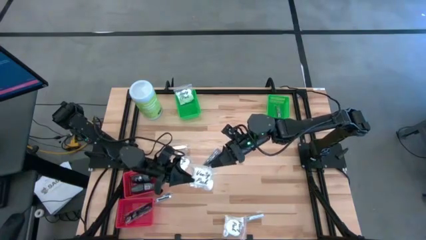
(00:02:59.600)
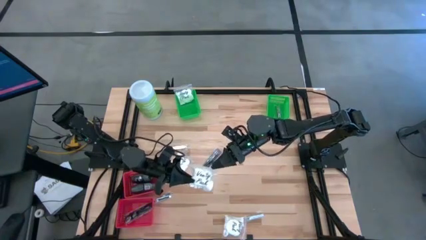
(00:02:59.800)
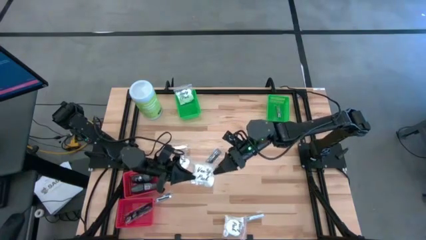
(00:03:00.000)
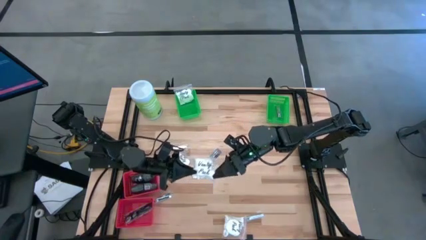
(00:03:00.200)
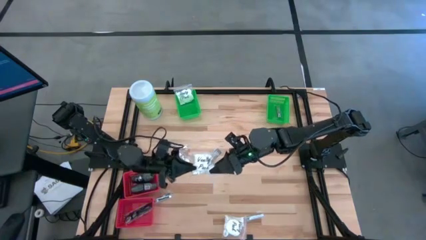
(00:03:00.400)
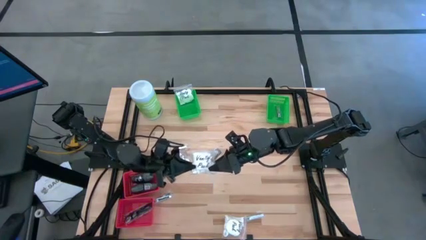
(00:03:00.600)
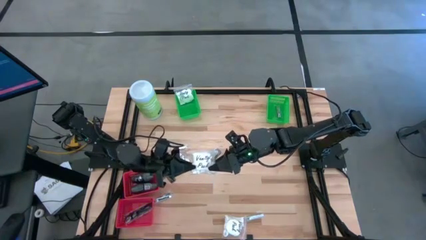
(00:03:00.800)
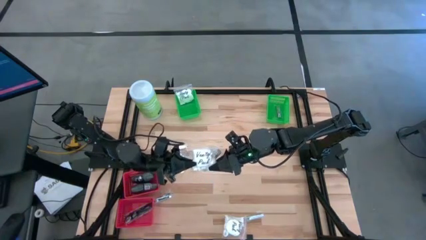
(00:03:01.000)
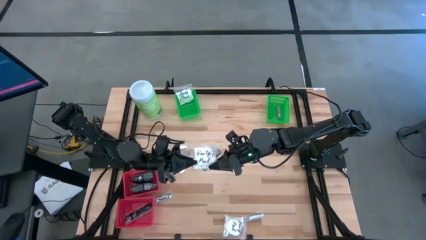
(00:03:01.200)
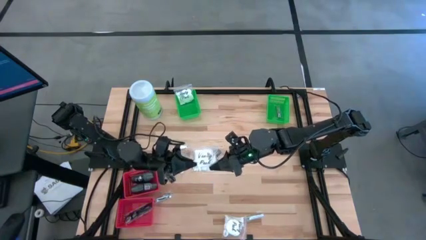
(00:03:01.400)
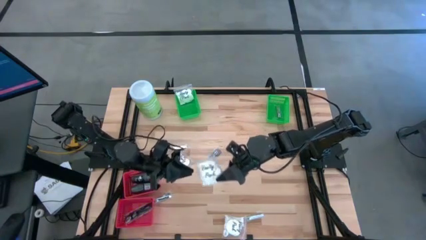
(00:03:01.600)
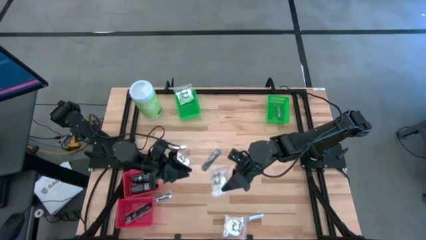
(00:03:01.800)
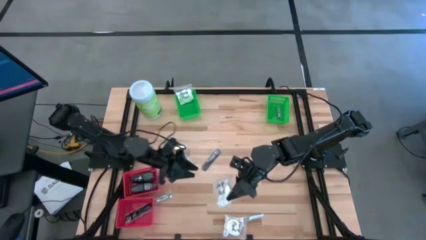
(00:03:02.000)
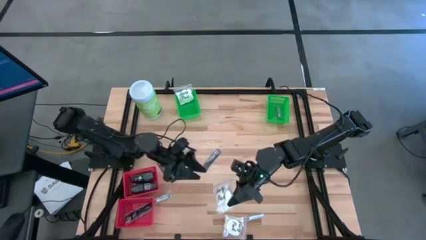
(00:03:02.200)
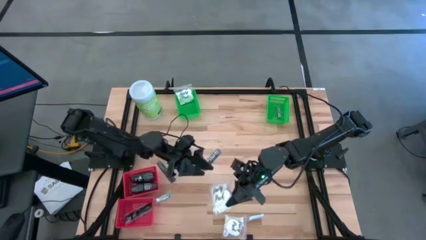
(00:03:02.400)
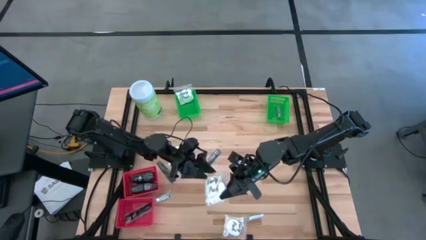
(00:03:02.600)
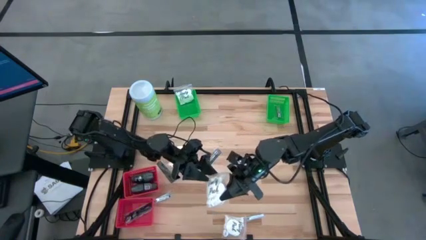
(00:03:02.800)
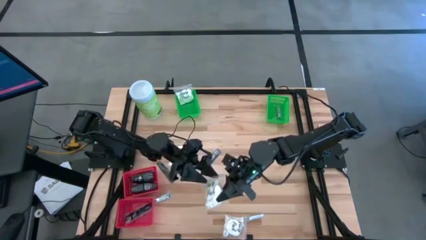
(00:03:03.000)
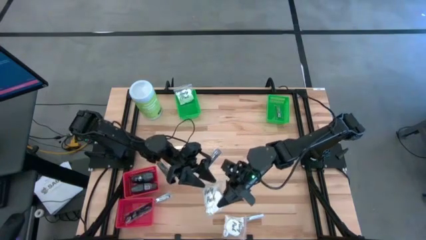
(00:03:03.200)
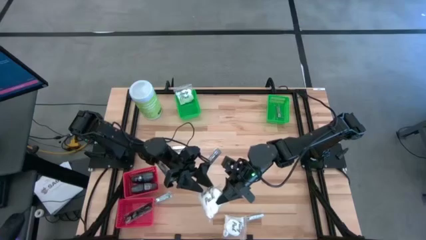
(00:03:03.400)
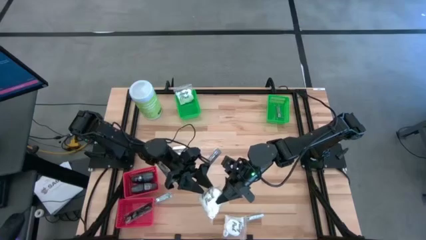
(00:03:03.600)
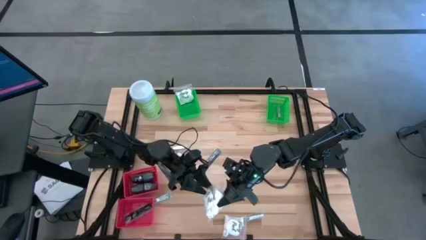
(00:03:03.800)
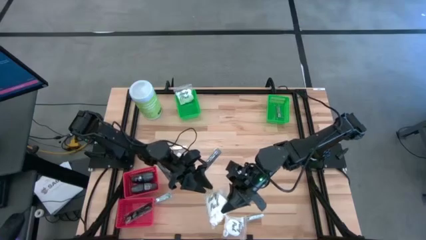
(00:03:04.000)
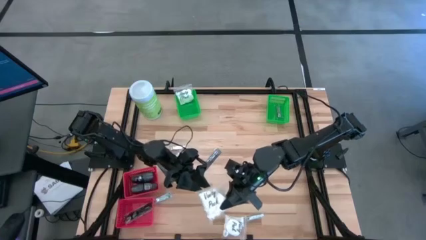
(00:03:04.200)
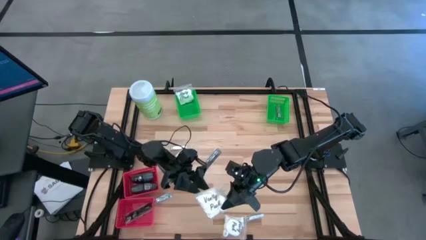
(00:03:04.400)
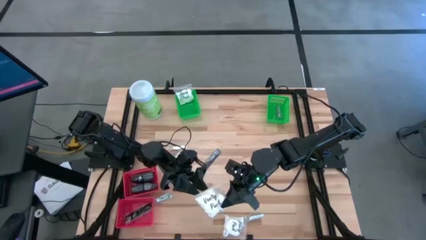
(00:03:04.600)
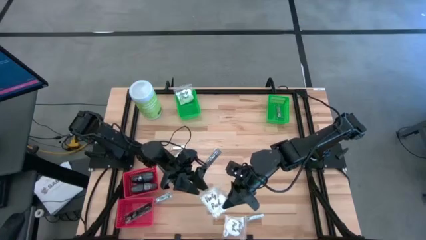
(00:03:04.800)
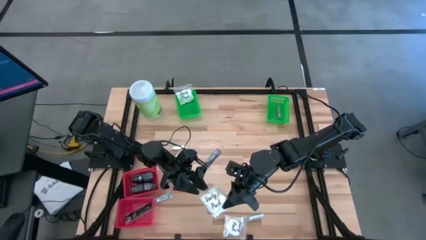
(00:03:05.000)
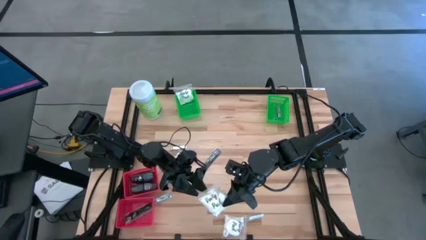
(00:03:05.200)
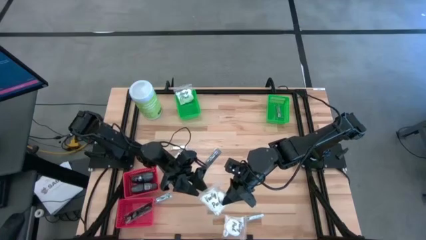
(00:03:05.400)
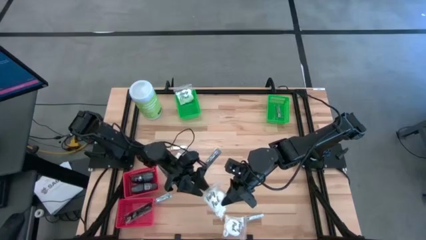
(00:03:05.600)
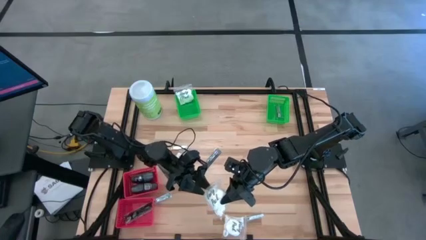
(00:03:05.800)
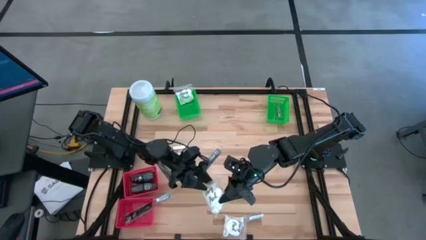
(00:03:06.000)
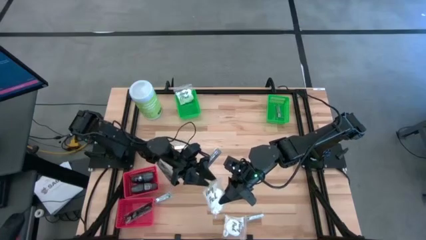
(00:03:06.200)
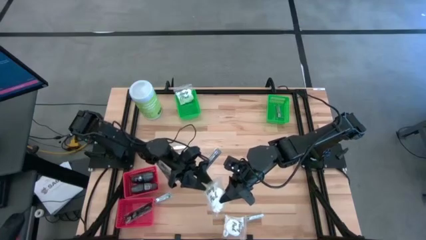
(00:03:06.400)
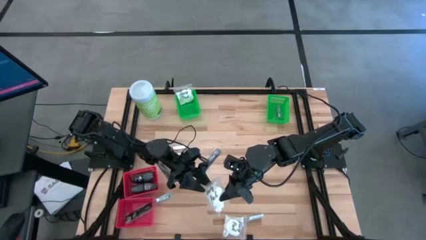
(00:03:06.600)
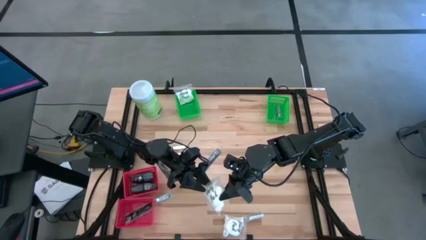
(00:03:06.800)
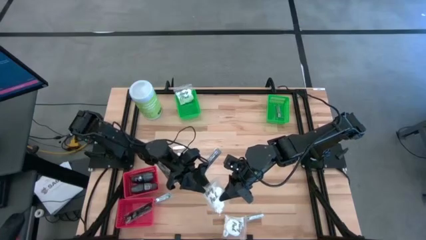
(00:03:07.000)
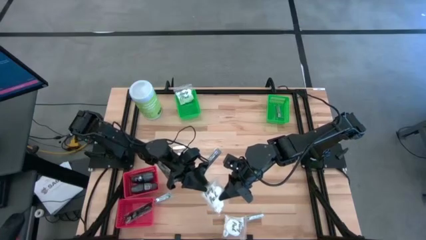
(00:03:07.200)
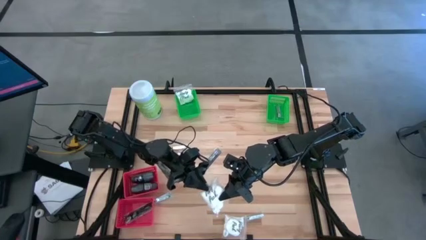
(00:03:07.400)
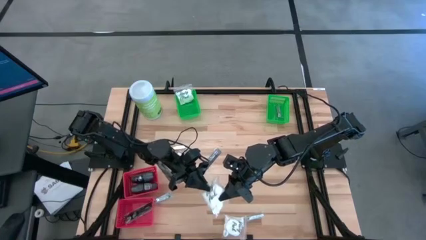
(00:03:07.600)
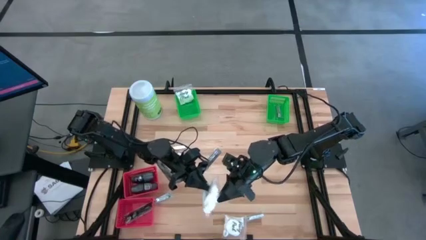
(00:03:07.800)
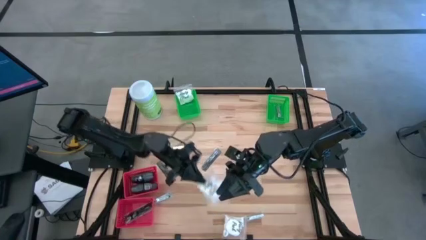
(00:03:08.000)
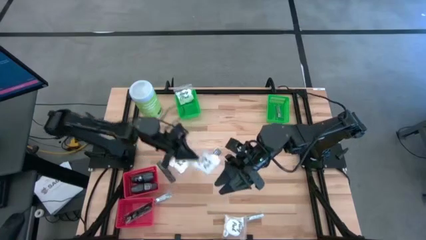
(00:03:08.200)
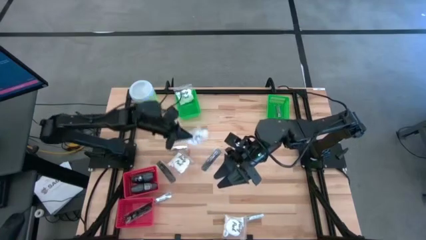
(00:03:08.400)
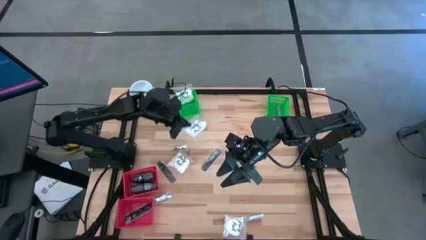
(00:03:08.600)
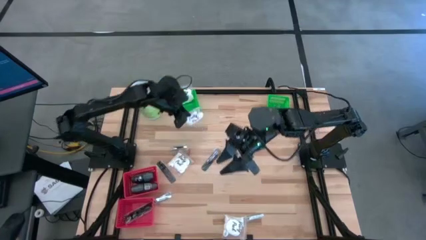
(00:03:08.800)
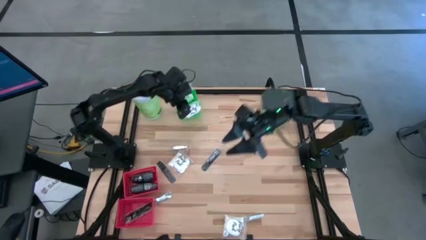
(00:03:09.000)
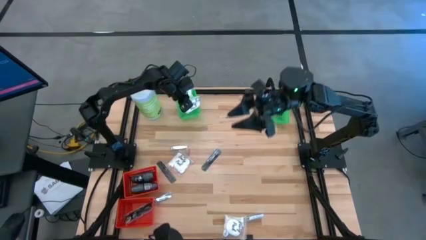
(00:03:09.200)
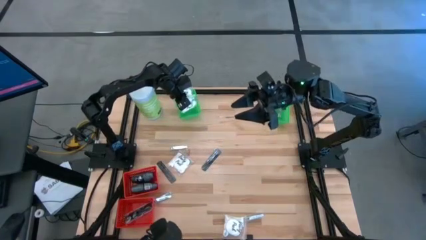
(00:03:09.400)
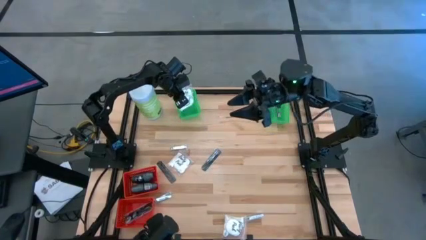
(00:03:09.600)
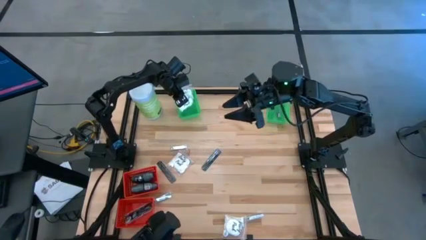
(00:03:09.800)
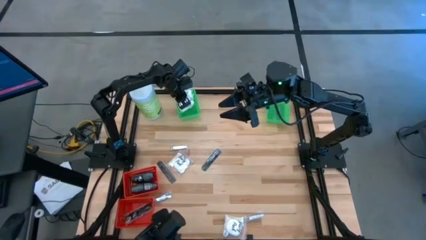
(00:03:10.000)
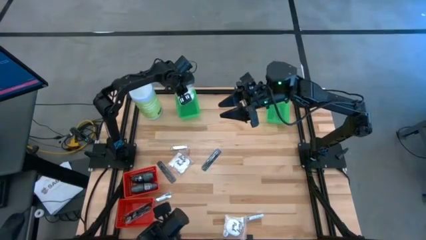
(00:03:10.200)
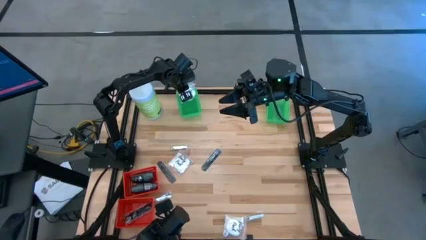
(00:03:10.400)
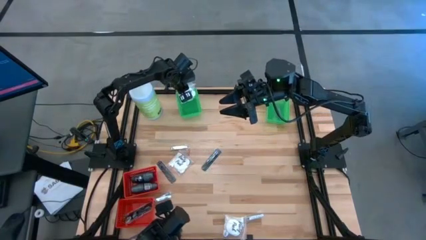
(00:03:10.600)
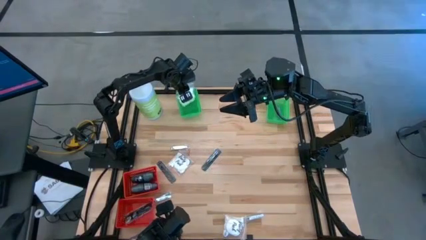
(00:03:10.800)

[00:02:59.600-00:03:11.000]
Task: Pick & Place Travel size toiletries
Put the white vanity pack into the top left green basket

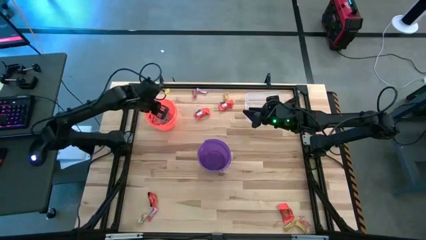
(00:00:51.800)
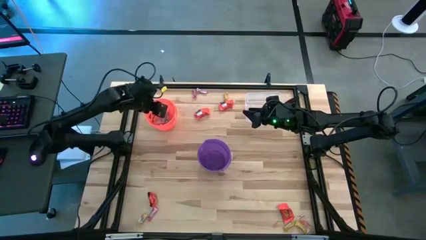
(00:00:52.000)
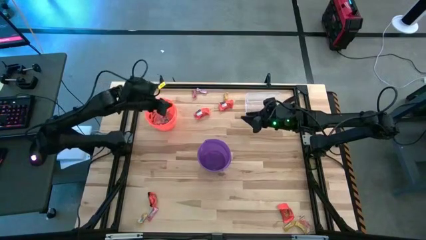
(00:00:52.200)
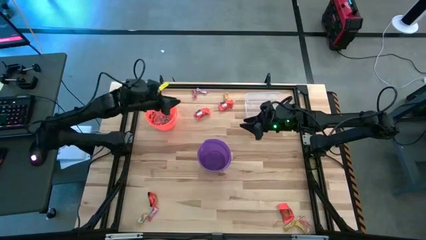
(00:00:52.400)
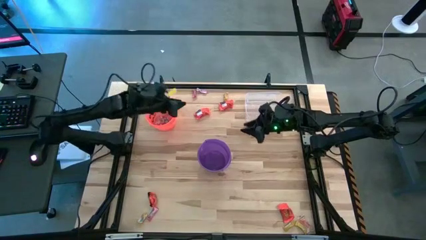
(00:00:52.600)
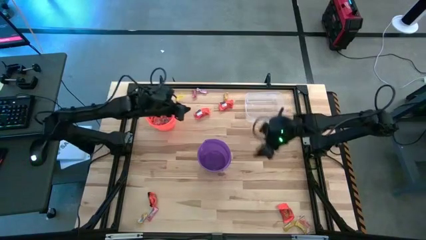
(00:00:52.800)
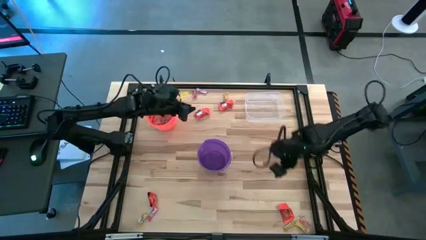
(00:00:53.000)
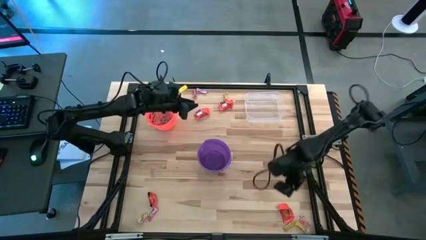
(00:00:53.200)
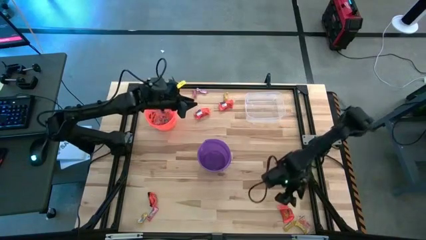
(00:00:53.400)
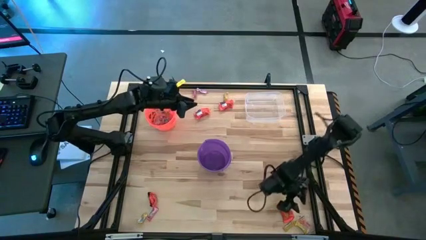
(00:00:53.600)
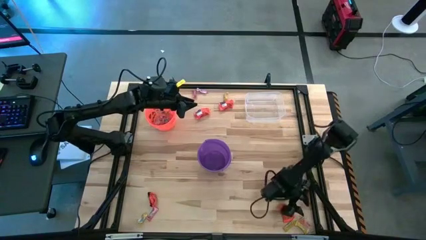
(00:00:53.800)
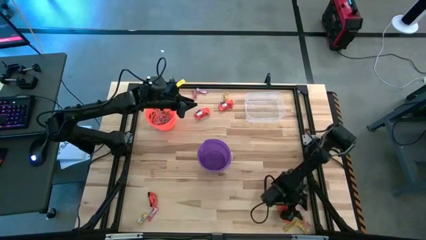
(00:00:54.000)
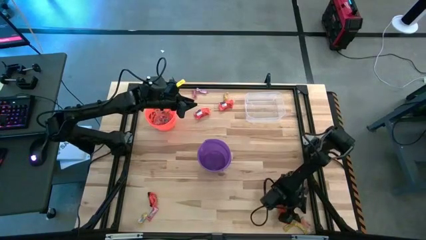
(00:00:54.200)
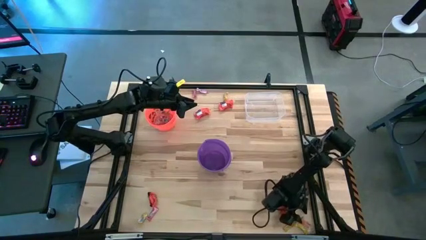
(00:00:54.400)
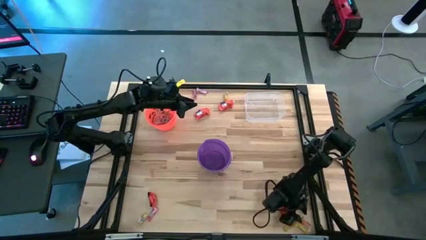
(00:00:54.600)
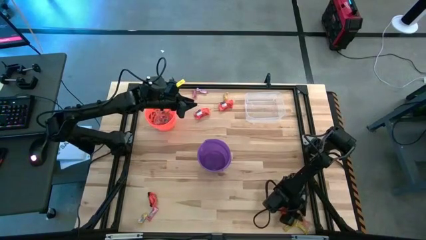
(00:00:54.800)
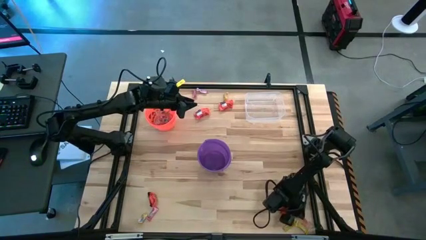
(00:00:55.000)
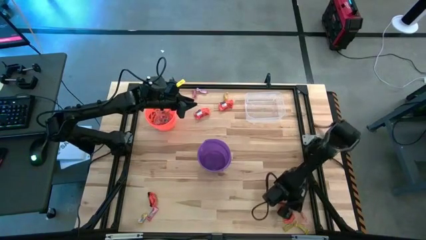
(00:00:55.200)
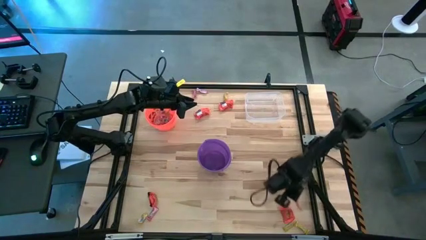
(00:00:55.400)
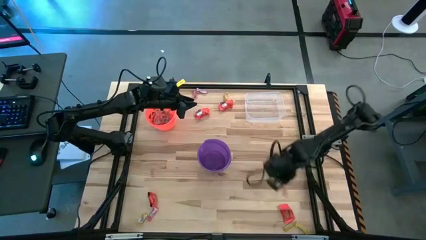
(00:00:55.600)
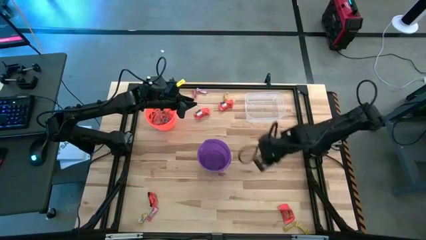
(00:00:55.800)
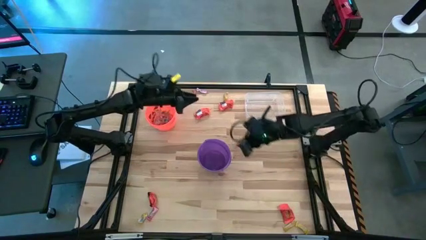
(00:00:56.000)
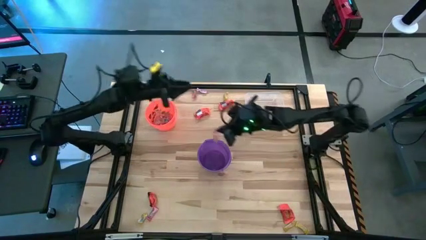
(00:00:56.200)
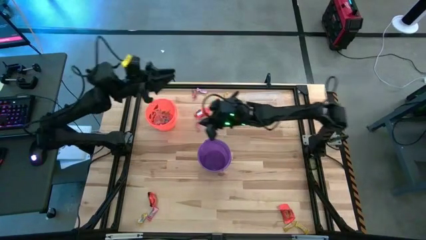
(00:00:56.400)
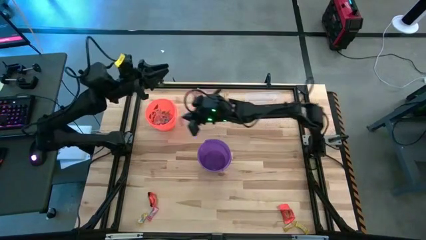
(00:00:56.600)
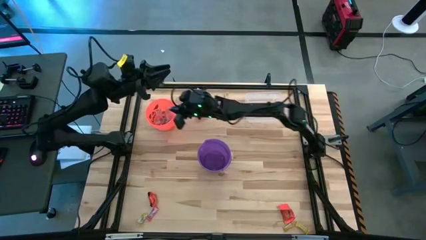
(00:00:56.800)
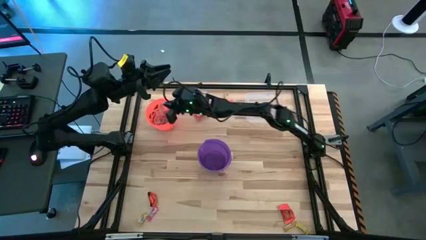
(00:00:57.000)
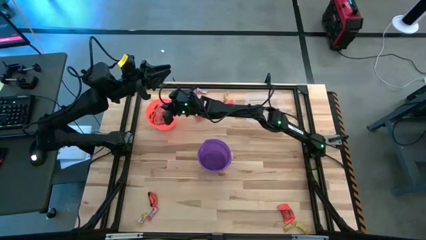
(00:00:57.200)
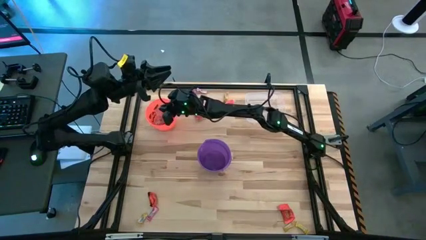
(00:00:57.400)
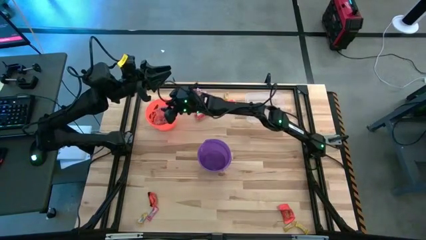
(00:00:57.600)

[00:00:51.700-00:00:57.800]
Task: Sort candy by brand, put in halloween buckets
Put the orange gummy into the orange bucket
